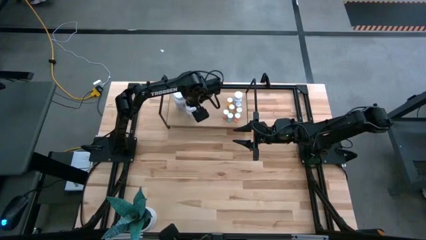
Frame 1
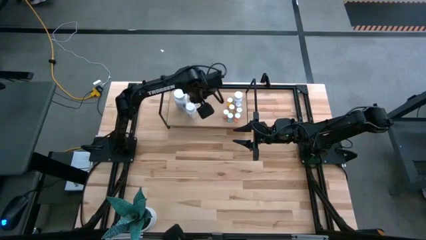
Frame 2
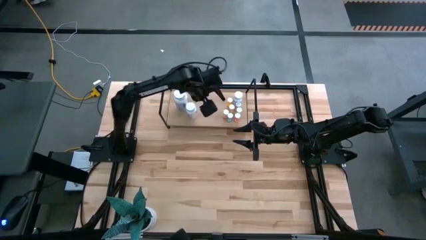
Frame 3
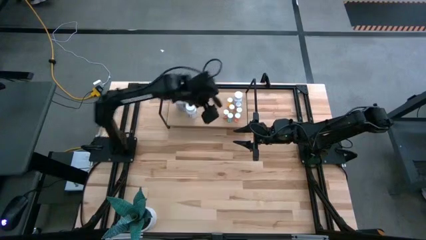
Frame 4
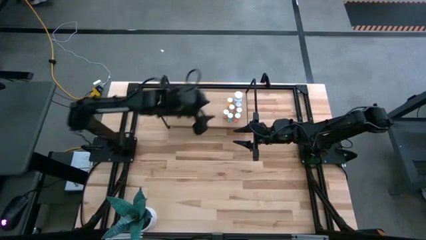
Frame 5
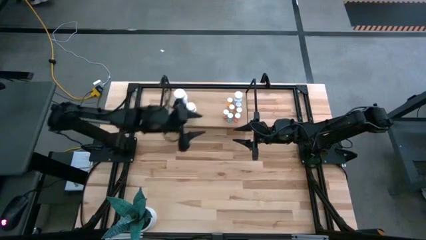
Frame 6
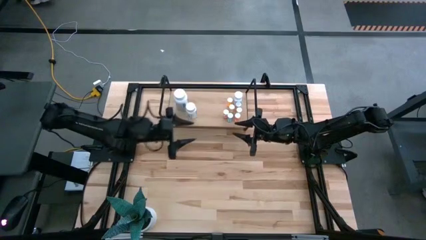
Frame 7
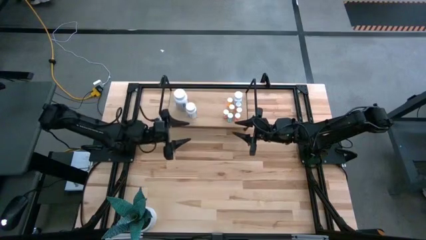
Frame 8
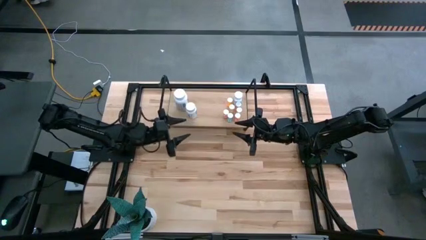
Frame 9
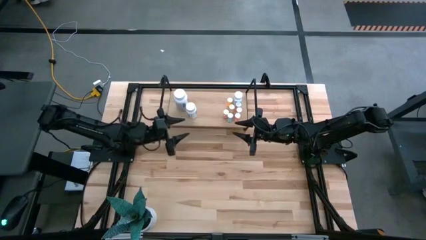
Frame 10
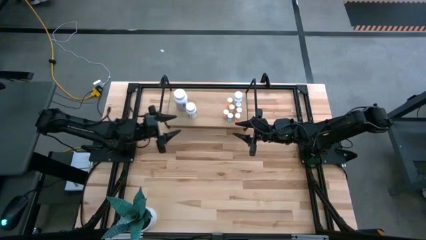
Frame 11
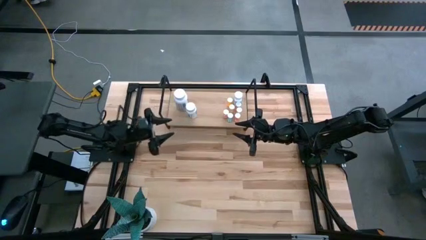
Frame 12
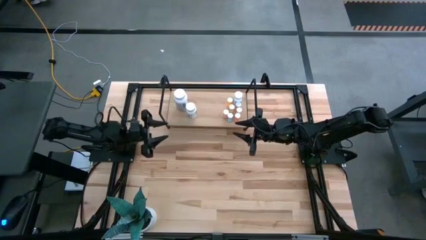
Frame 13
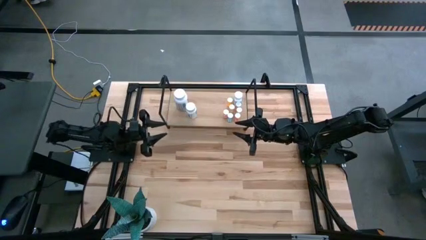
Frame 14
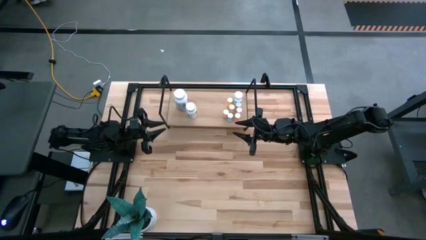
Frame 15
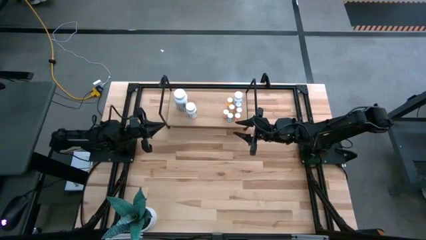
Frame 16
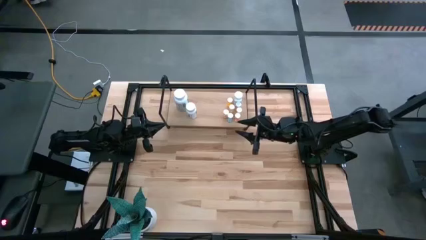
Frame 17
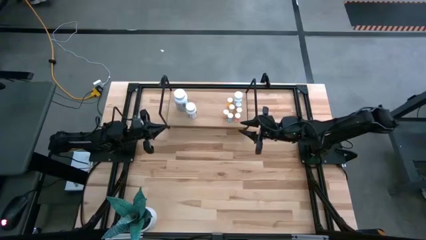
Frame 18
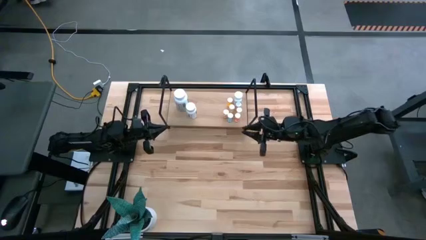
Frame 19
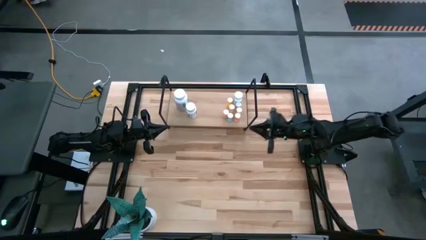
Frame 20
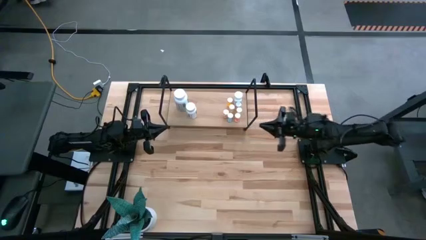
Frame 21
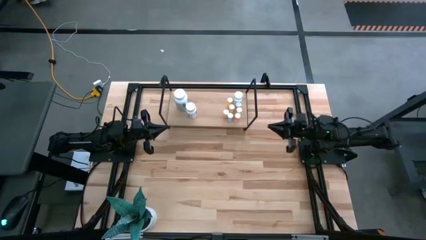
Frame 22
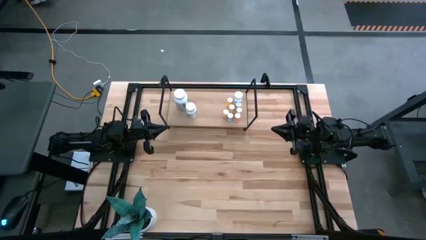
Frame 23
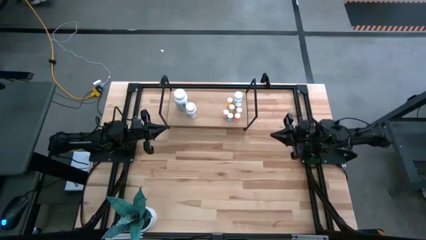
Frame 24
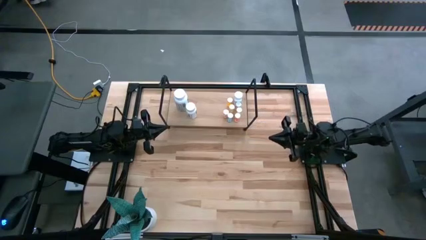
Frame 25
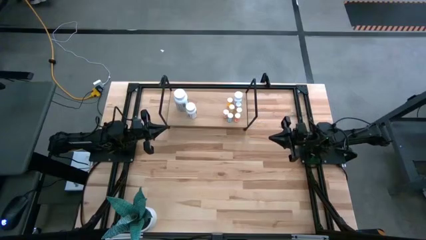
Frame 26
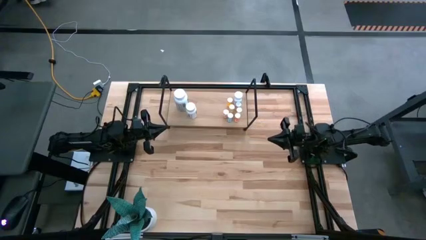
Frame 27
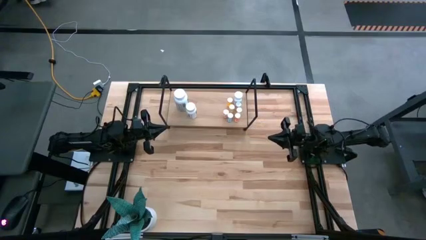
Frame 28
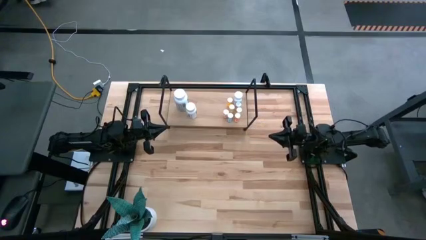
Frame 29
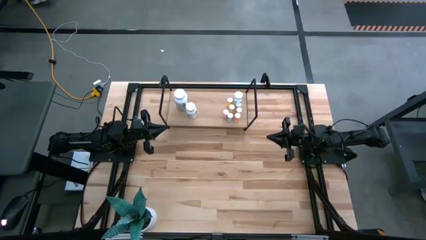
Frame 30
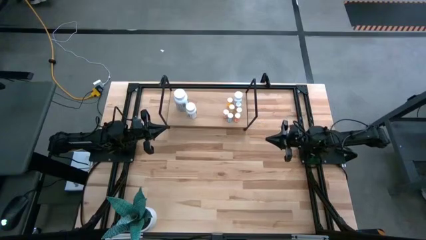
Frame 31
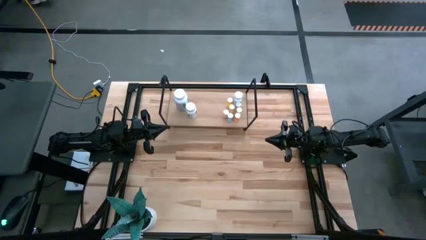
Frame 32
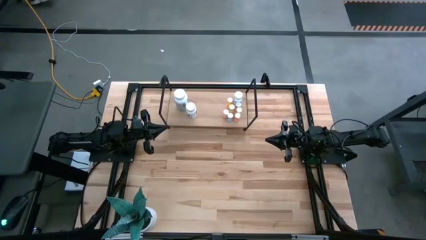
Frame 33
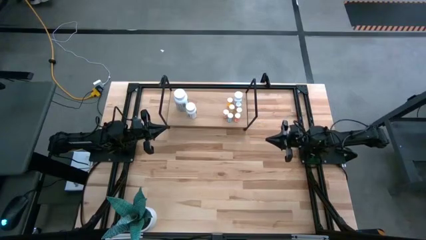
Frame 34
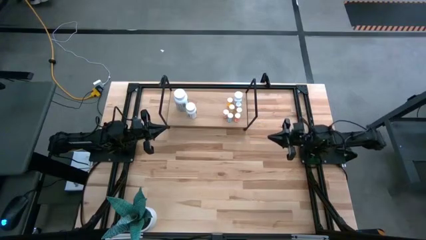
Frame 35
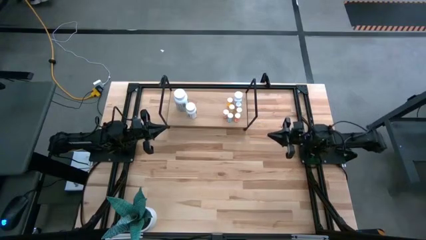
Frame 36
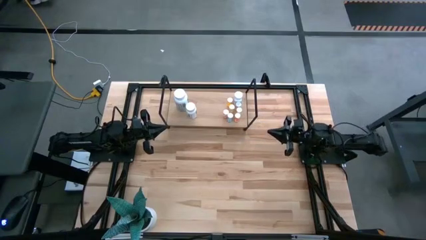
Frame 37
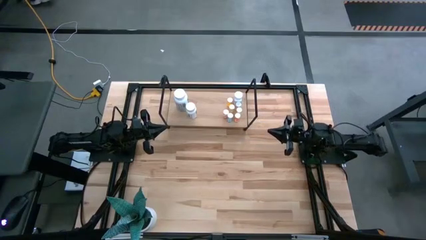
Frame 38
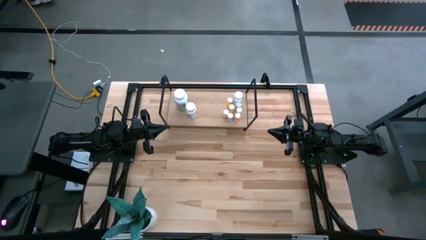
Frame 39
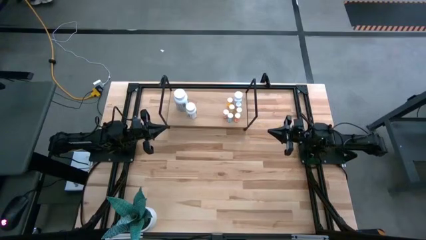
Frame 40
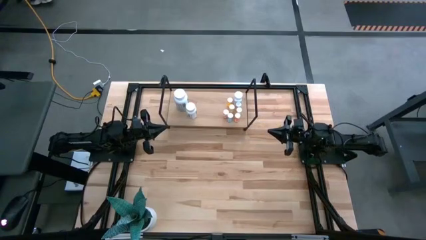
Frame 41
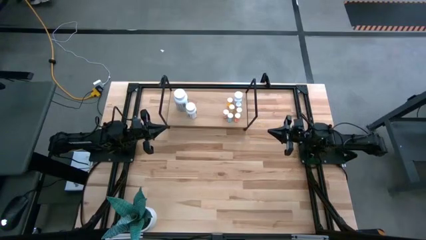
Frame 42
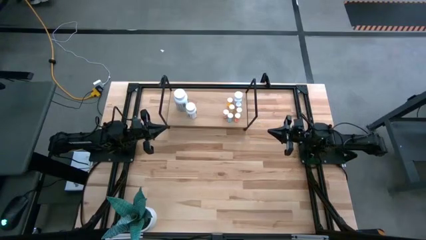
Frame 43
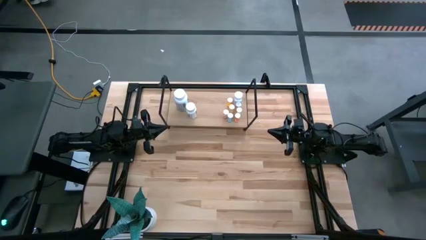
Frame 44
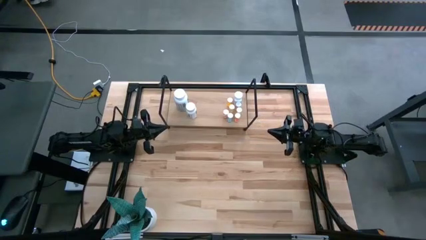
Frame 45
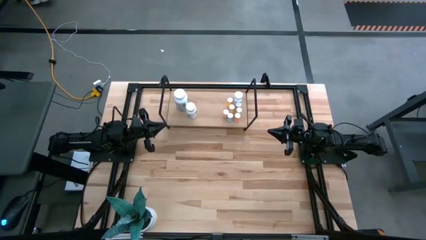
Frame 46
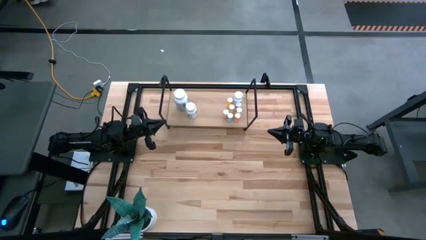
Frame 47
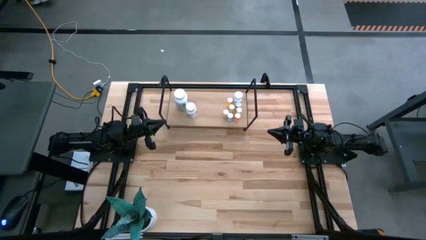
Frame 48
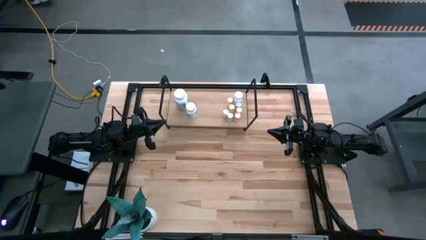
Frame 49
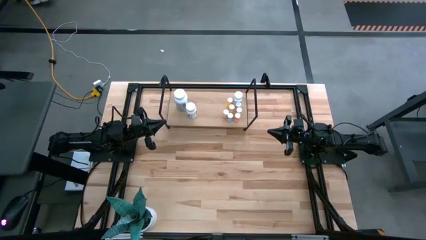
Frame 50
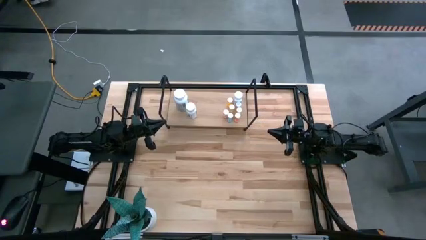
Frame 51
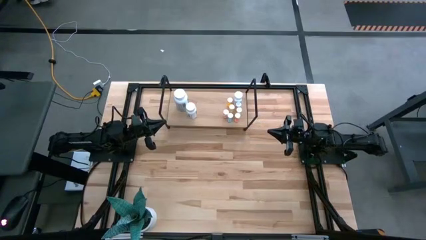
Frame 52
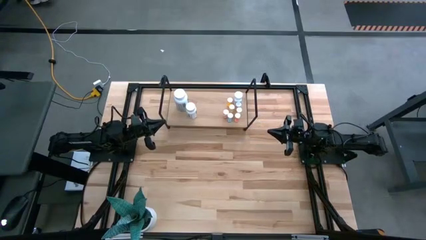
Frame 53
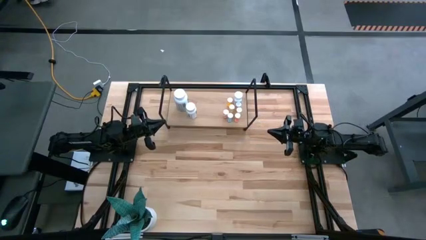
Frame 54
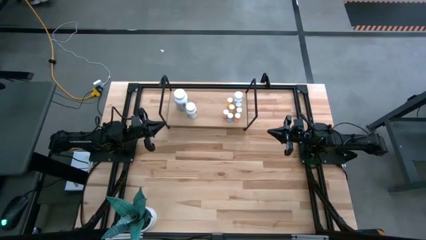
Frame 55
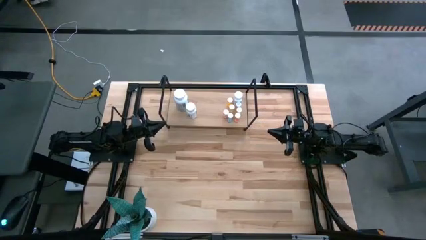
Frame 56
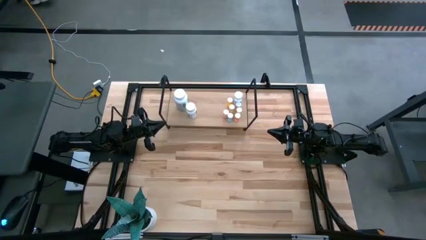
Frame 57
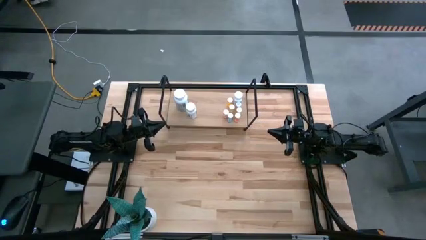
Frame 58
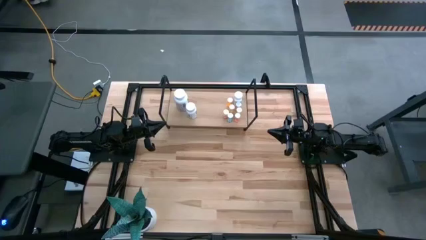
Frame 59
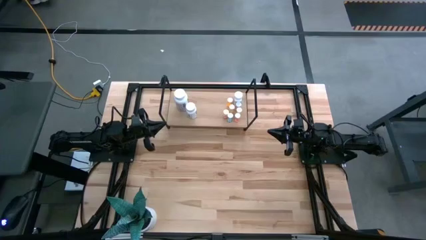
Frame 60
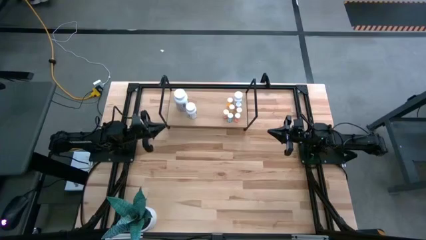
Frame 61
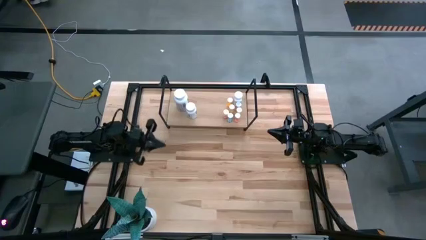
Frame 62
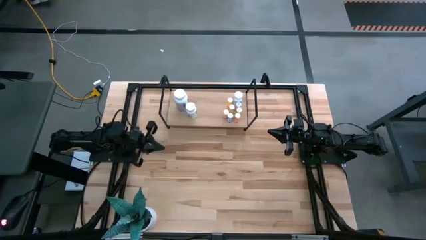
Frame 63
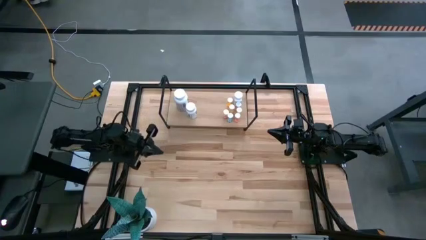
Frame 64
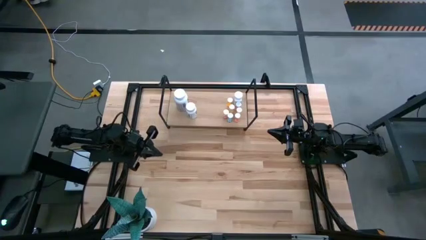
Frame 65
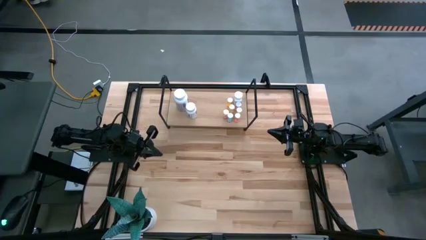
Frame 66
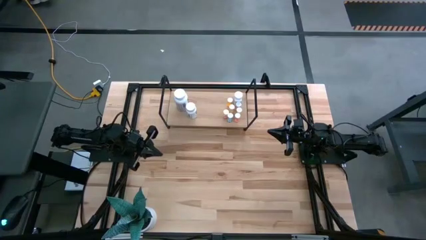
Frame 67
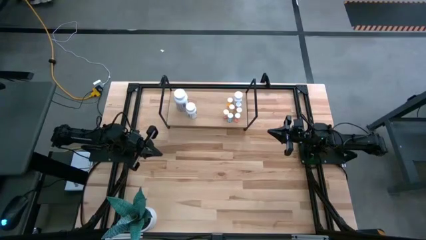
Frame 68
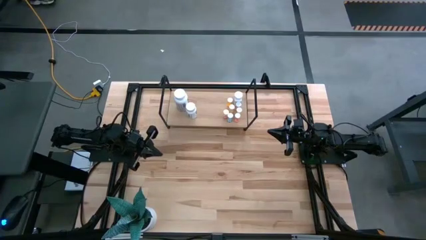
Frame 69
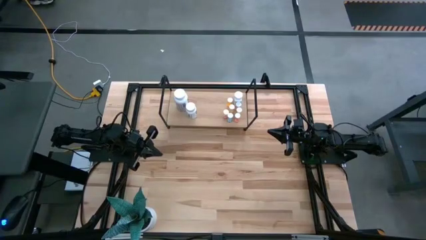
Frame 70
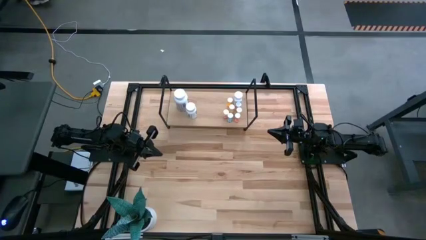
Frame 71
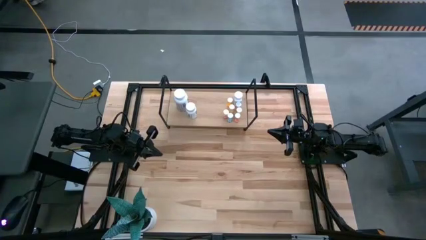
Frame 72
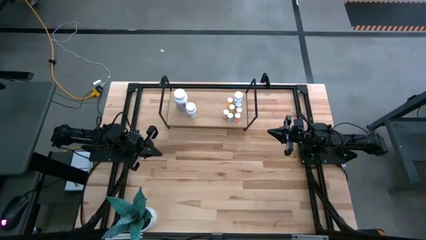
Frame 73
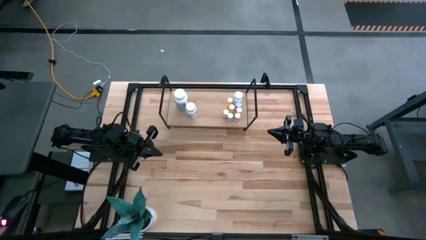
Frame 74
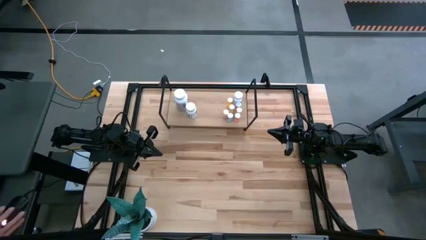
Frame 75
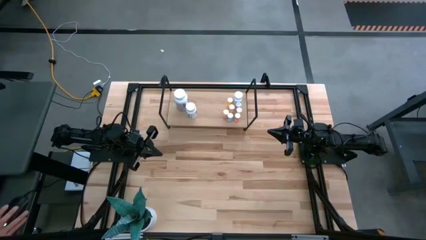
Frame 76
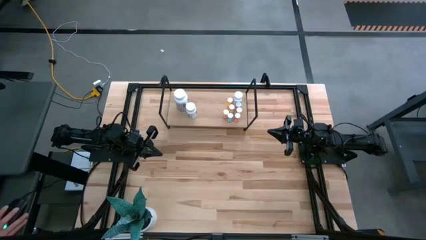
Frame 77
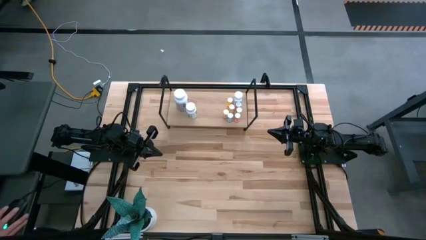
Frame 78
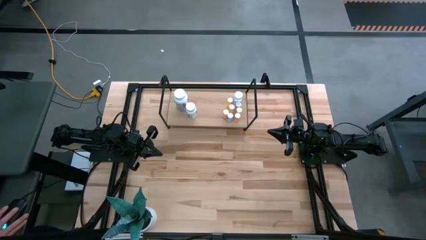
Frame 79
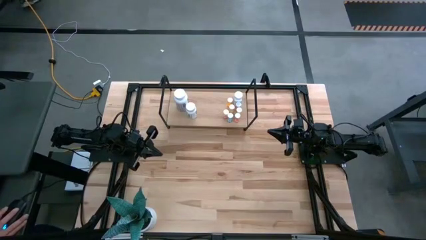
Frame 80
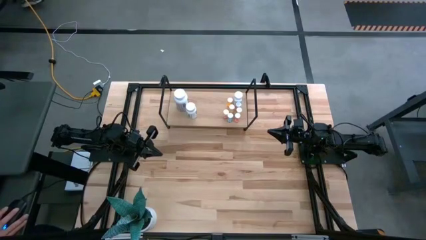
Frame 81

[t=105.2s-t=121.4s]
Task: Pick and place medicine bottles onto shelf by color
Return to Home Position
